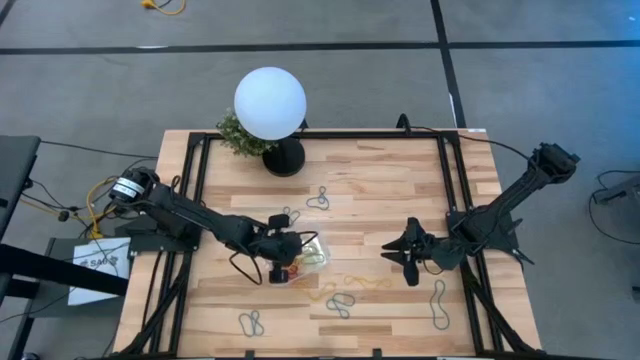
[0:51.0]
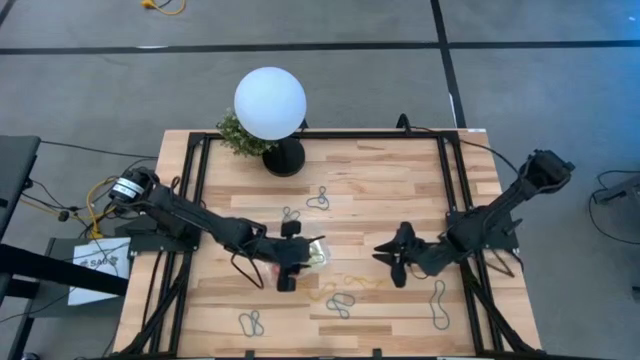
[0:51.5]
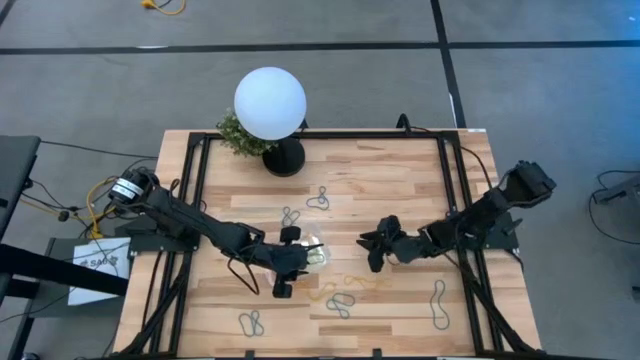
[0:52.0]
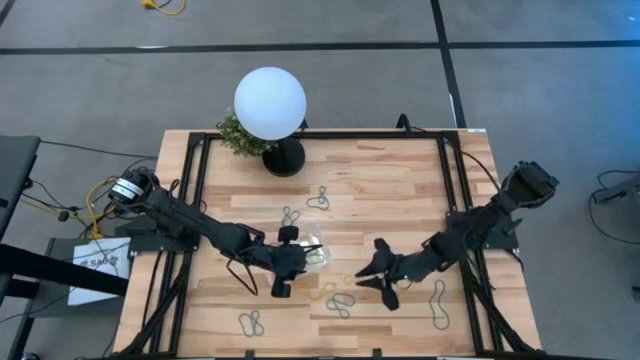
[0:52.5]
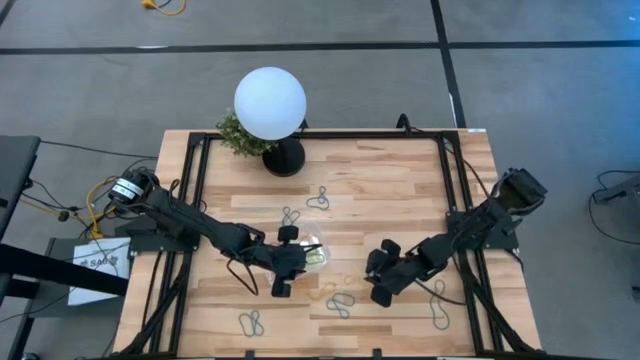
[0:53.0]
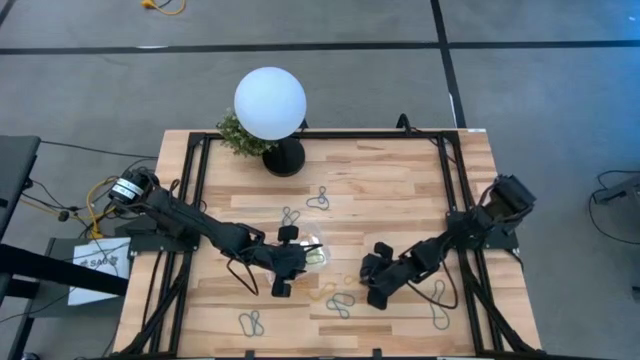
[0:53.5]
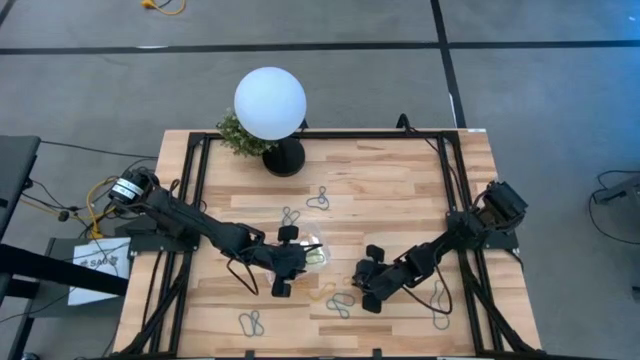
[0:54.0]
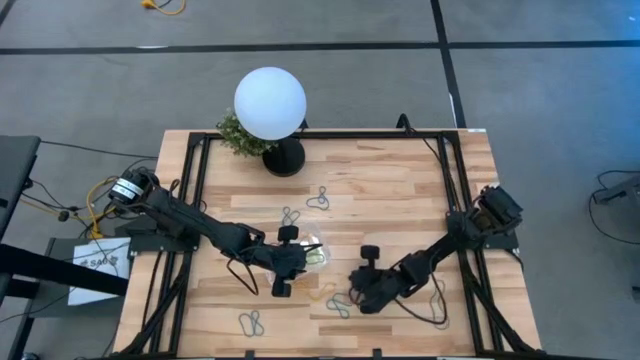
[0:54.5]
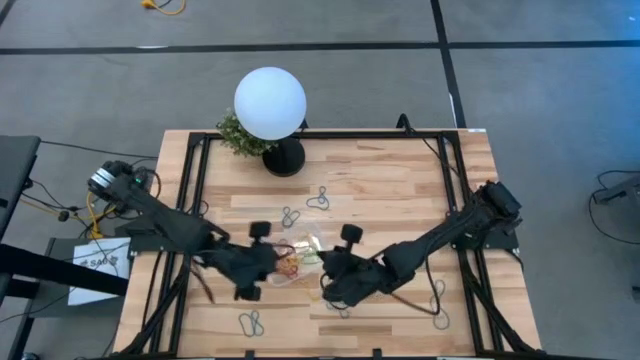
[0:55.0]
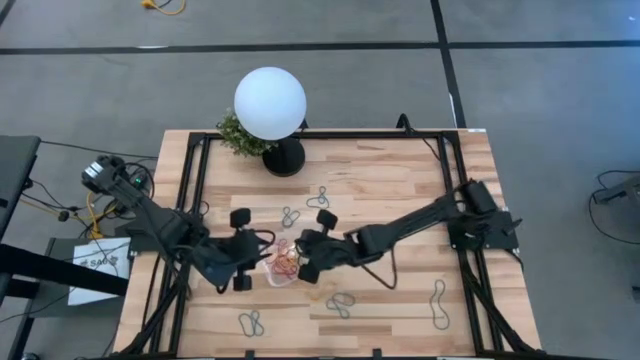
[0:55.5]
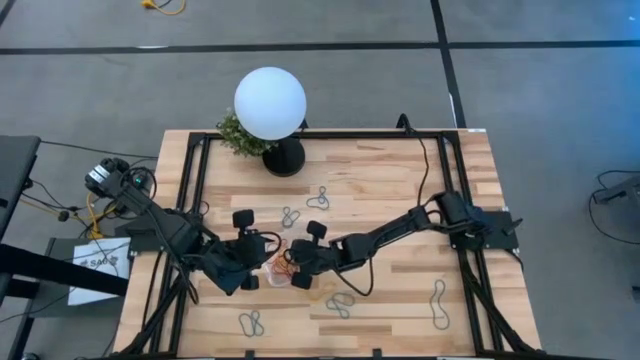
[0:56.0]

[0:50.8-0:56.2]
Task: Pick and place items into bin
Put the yellow rubber band into the transparent bin

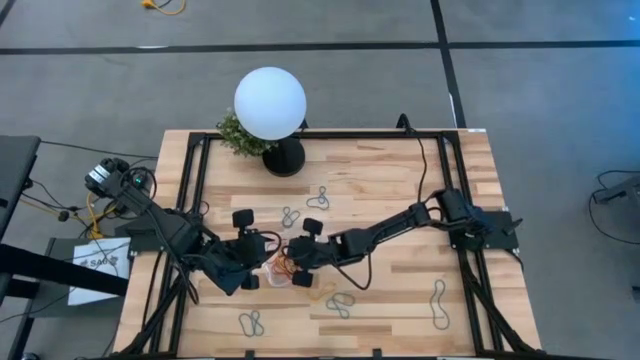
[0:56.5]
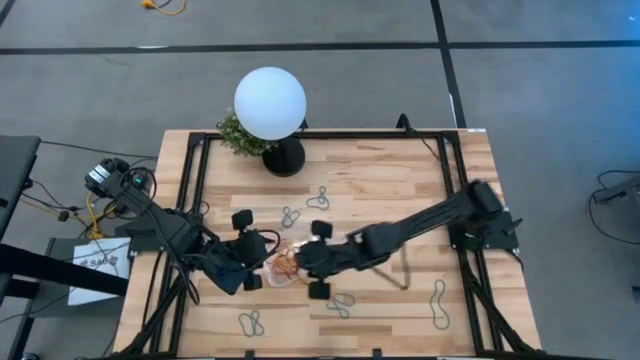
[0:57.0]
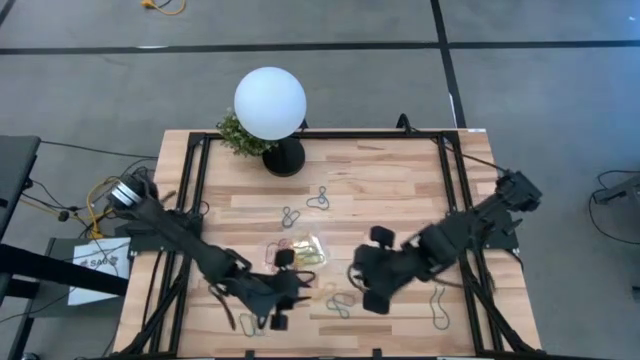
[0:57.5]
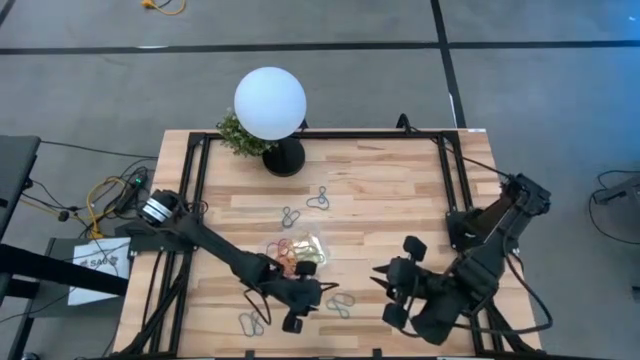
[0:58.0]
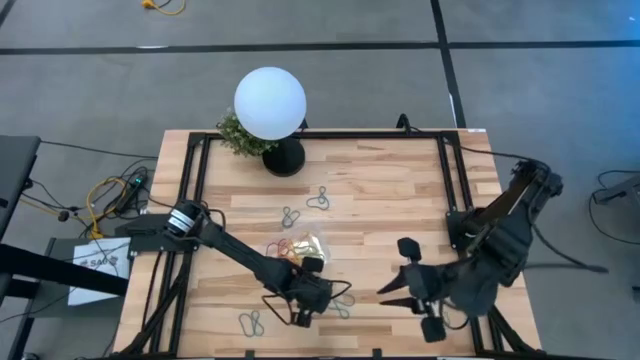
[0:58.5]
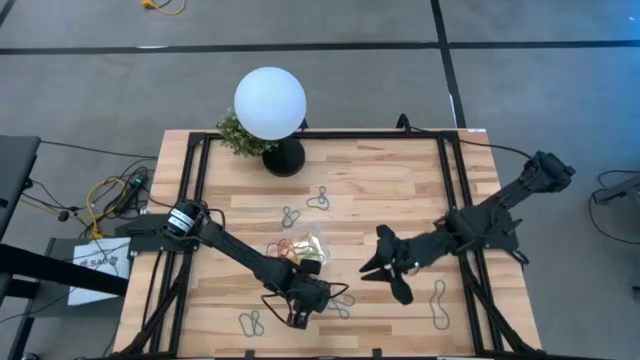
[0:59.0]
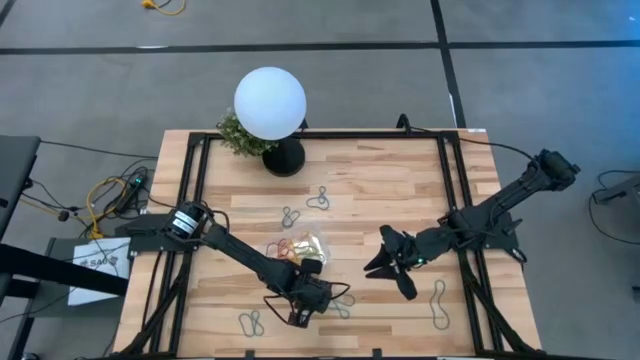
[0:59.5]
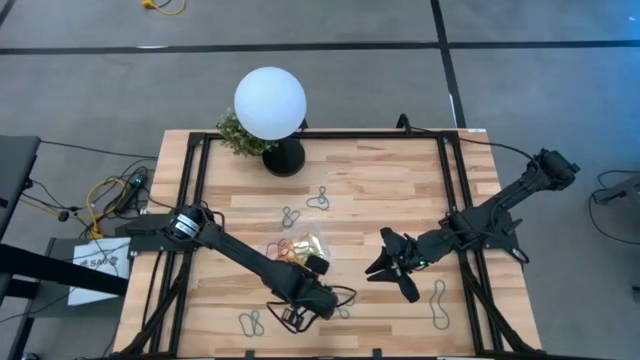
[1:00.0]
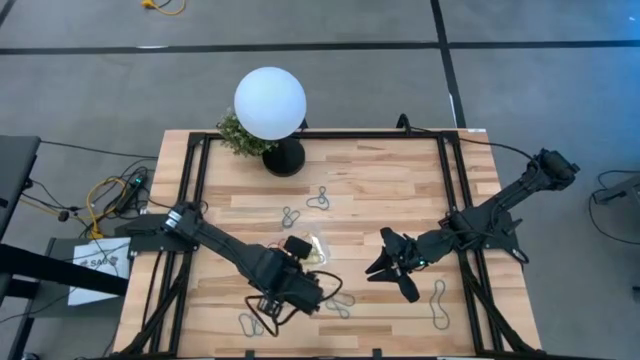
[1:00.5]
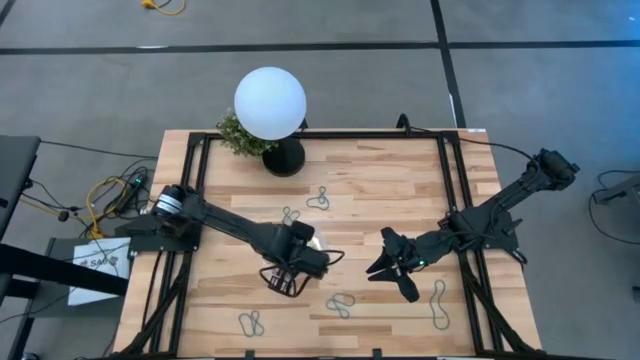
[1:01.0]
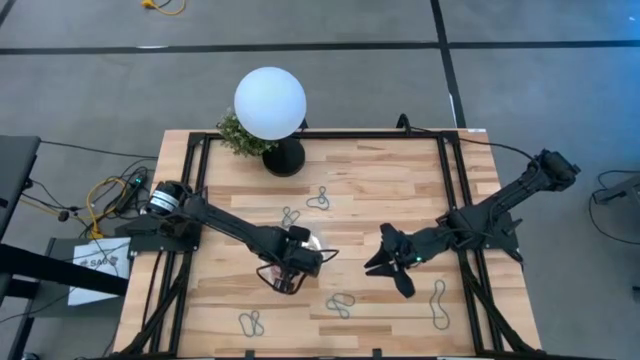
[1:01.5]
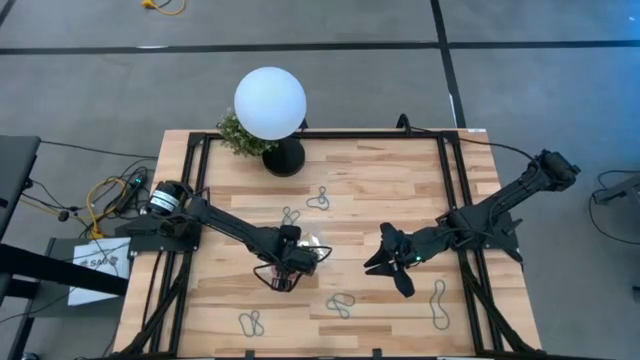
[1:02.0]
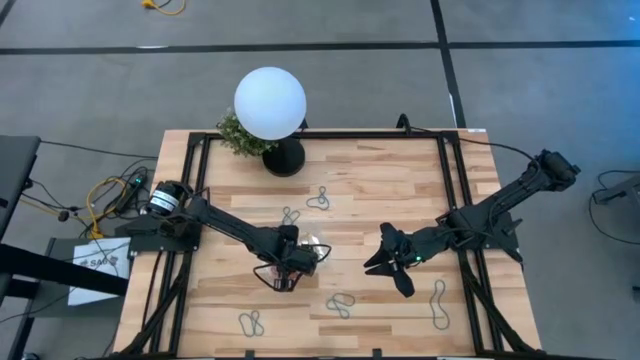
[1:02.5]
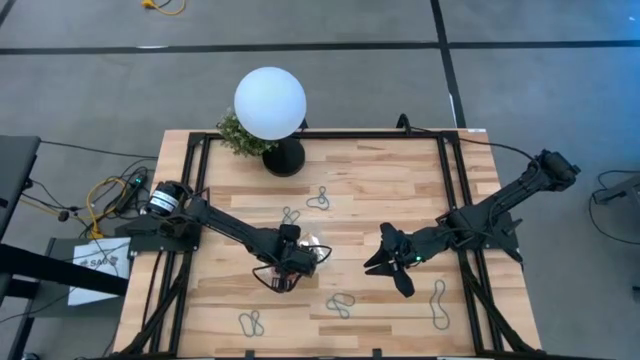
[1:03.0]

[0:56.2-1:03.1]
Put the yellow rubber band into the transparent bin

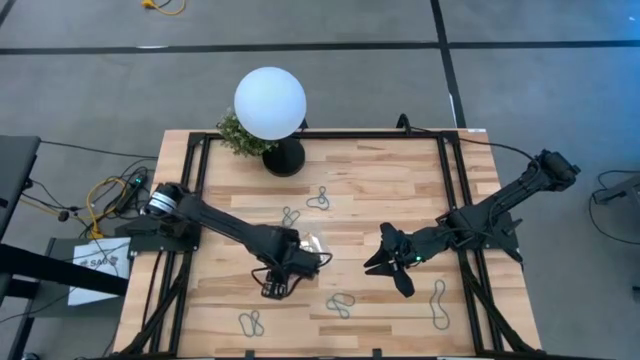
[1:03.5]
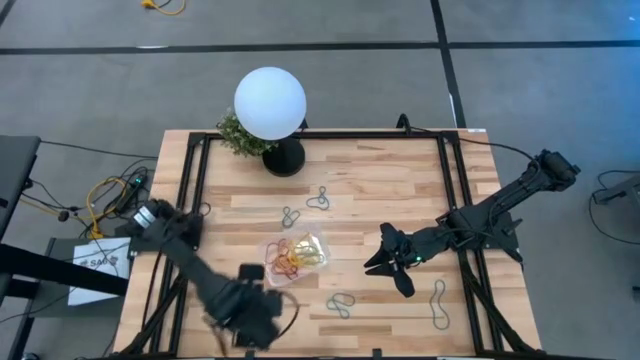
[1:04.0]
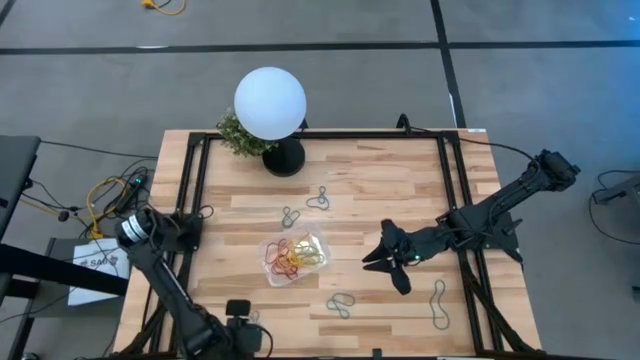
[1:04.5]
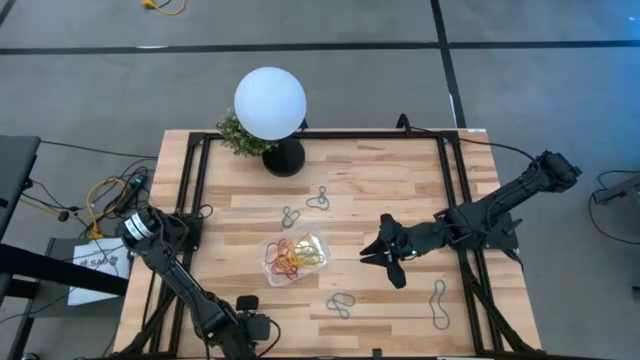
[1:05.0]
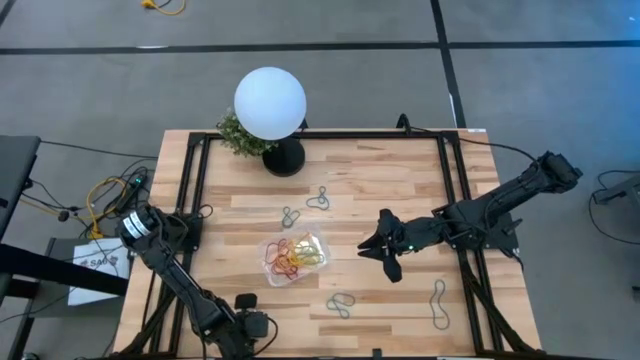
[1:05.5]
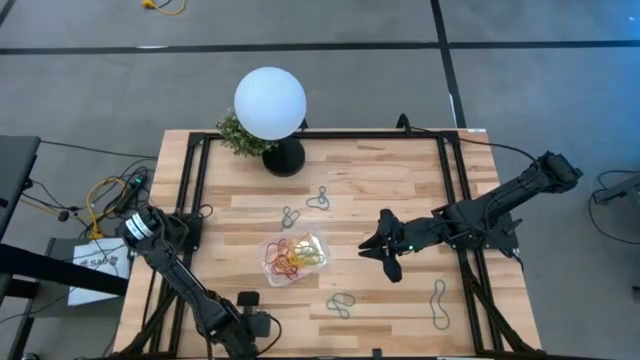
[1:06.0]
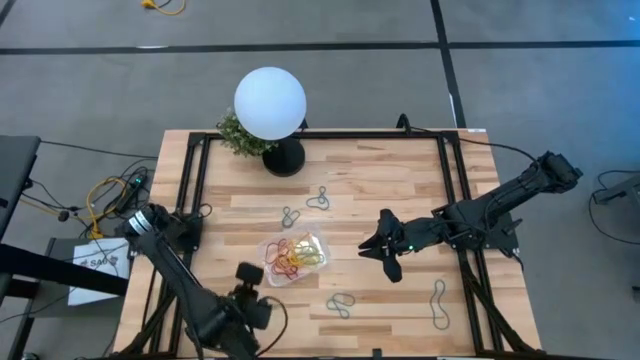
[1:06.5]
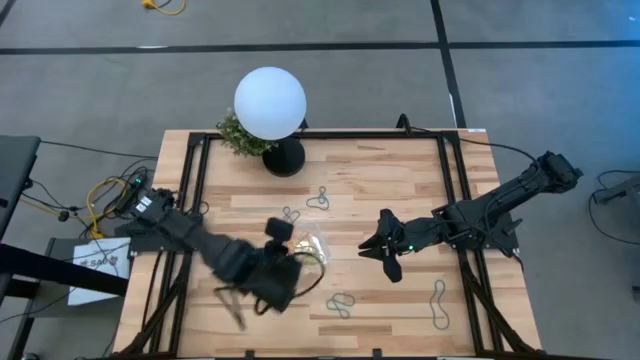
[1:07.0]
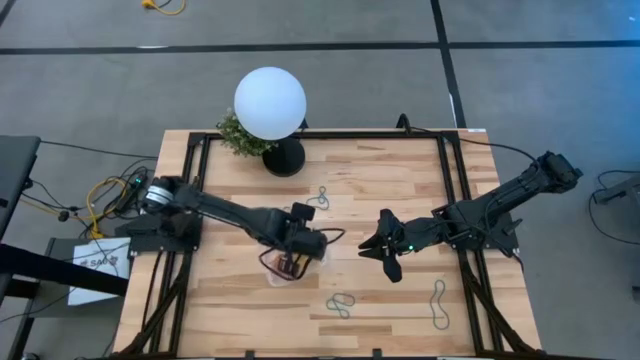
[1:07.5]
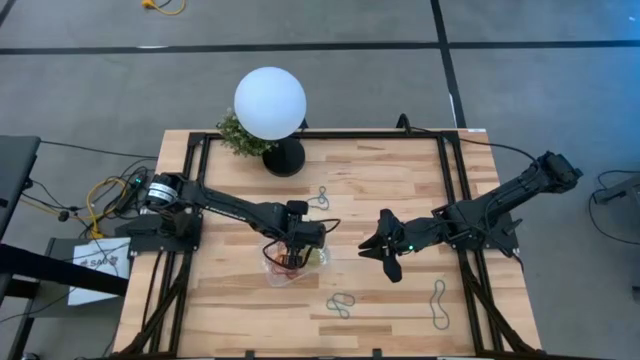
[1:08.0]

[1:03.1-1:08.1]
Put the blue rubber band into the transparent bin

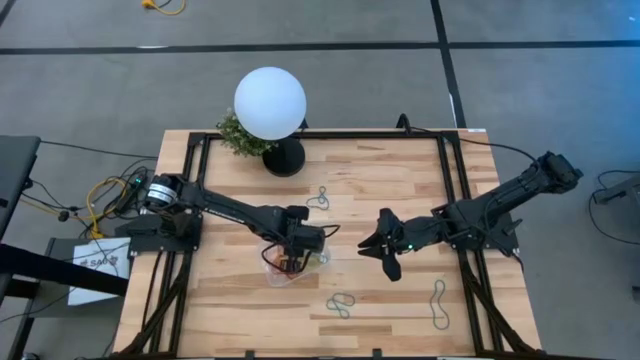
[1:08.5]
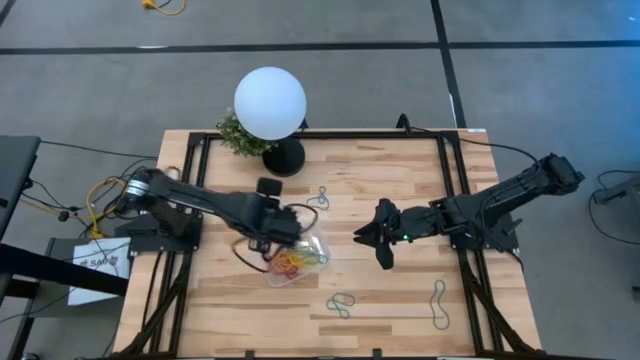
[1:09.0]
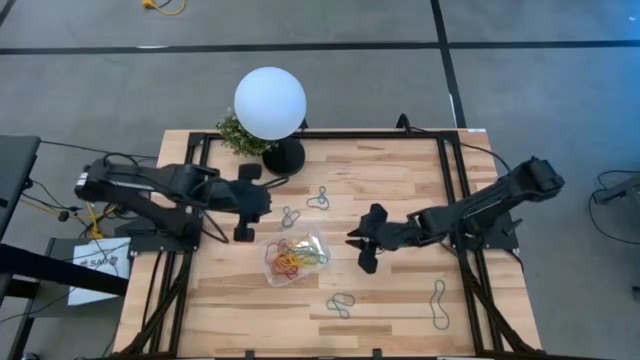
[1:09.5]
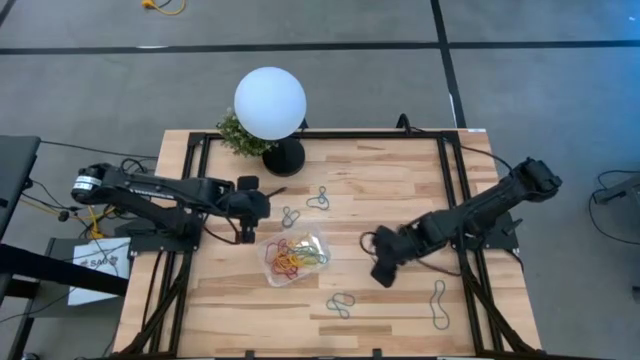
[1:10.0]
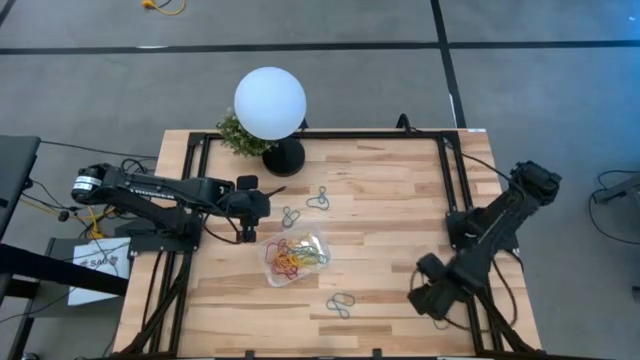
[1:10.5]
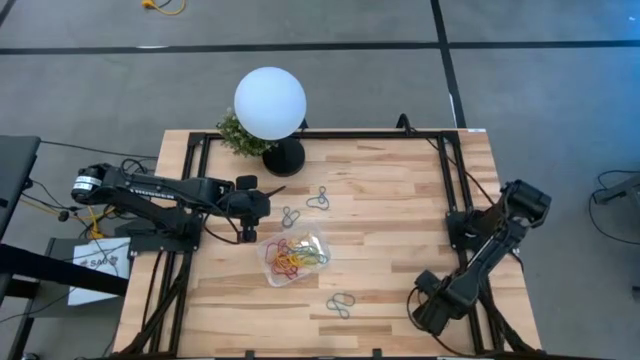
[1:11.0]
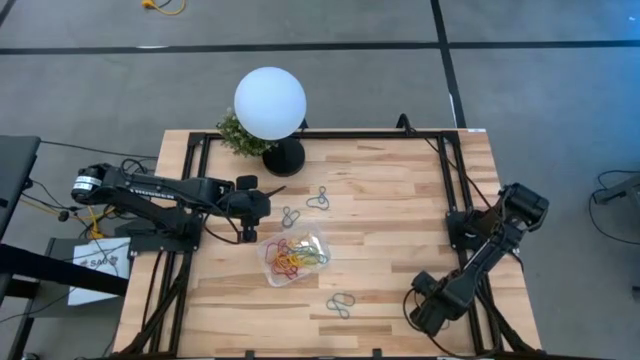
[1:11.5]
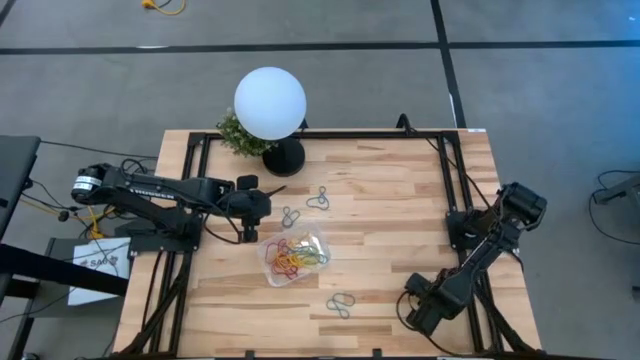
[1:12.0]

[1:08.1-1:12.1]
Put the blue rubber band into the transparent bin
